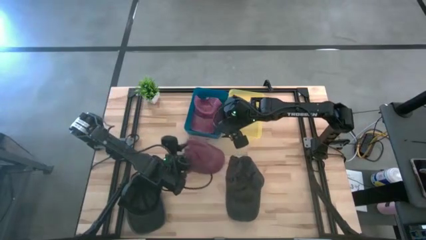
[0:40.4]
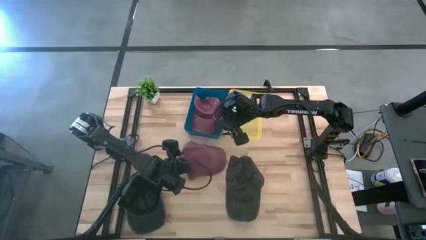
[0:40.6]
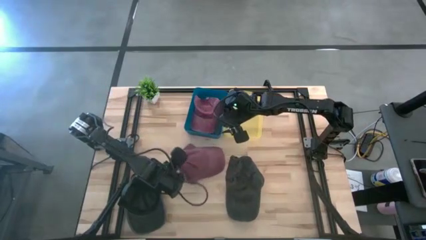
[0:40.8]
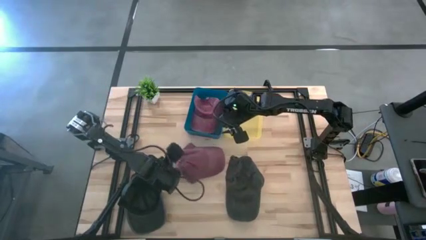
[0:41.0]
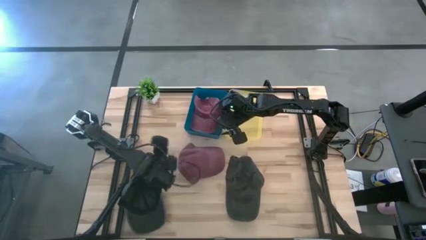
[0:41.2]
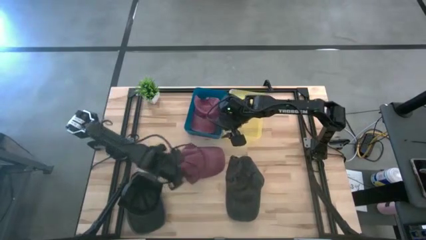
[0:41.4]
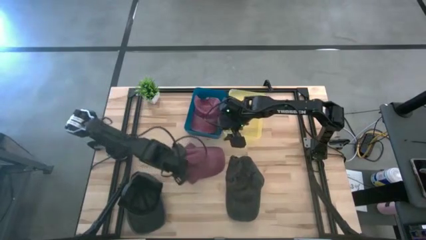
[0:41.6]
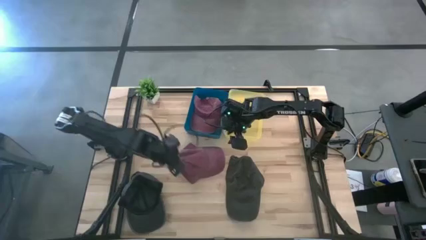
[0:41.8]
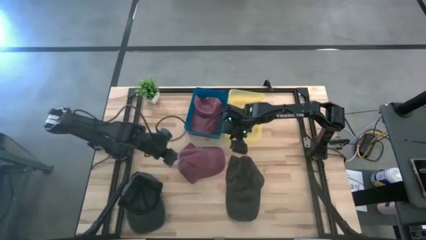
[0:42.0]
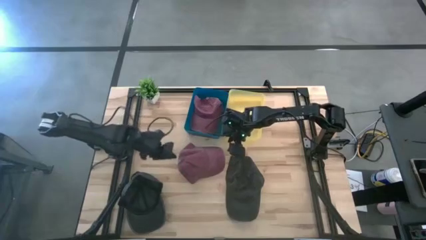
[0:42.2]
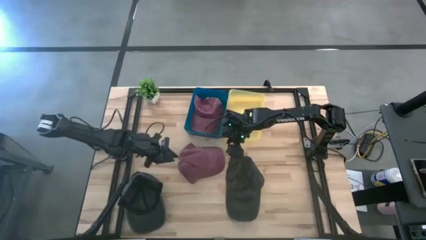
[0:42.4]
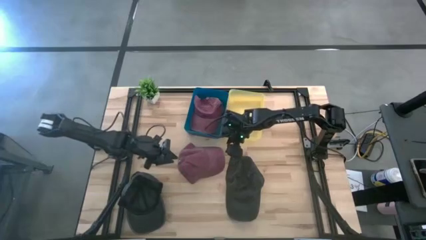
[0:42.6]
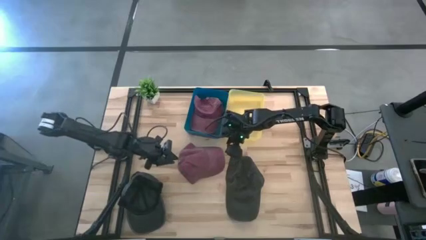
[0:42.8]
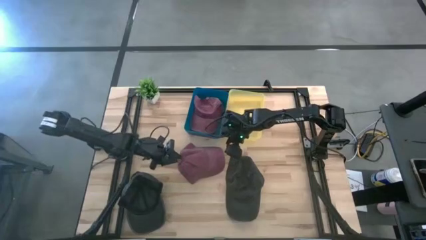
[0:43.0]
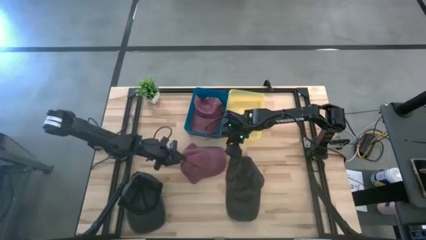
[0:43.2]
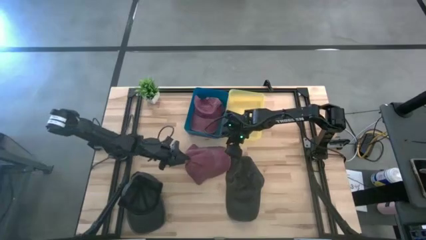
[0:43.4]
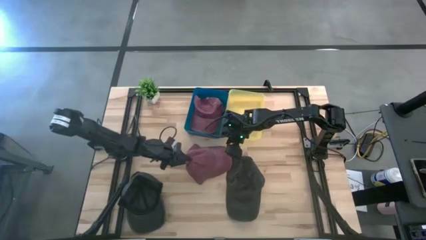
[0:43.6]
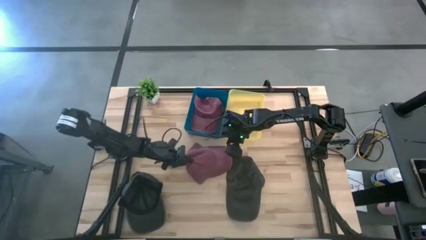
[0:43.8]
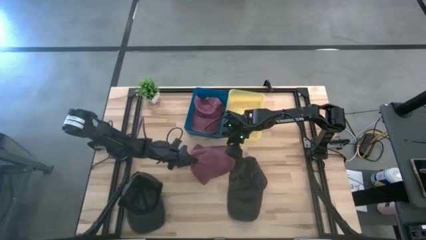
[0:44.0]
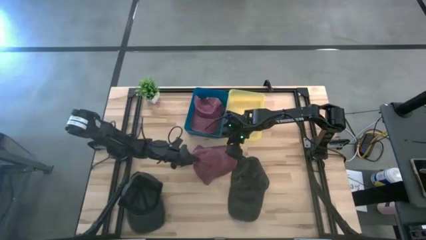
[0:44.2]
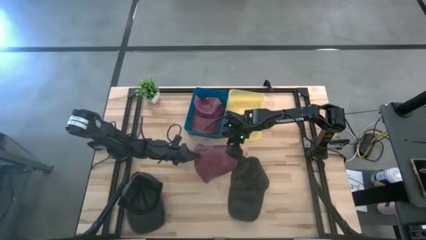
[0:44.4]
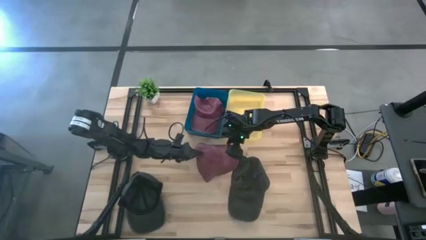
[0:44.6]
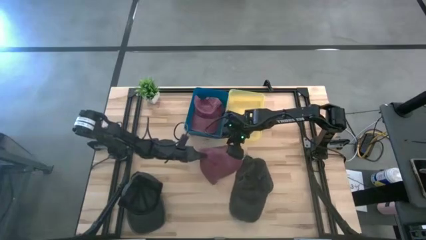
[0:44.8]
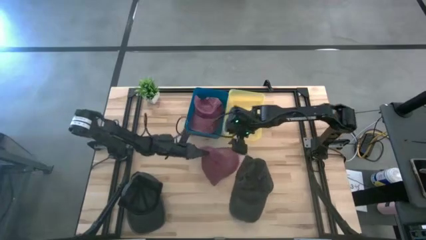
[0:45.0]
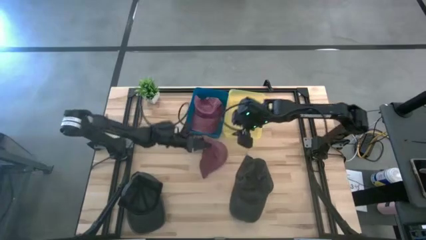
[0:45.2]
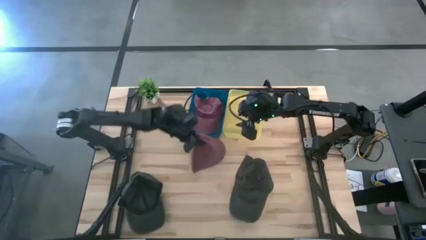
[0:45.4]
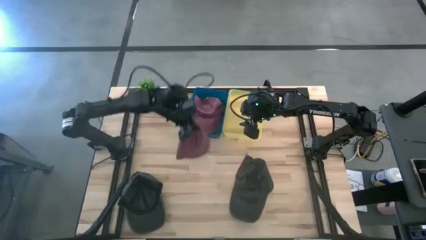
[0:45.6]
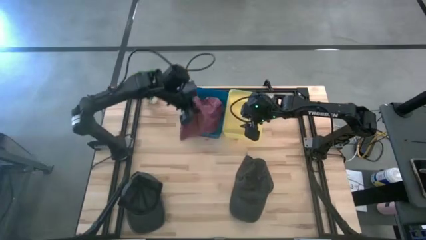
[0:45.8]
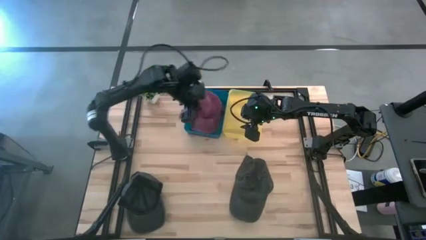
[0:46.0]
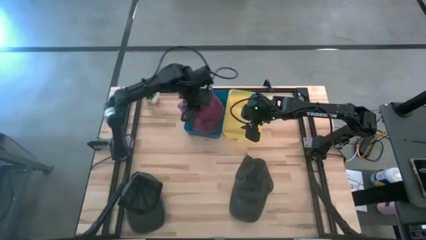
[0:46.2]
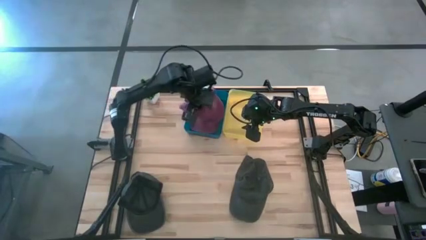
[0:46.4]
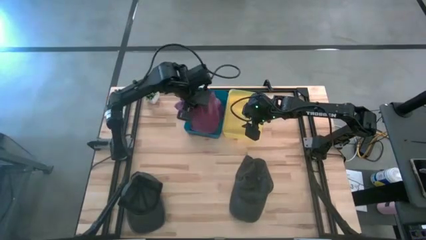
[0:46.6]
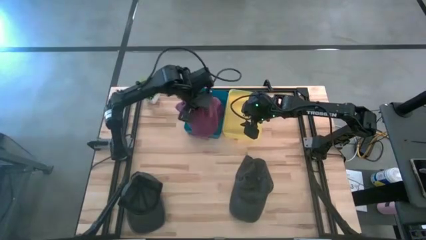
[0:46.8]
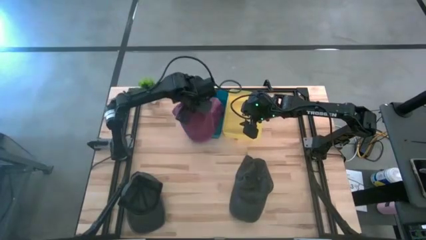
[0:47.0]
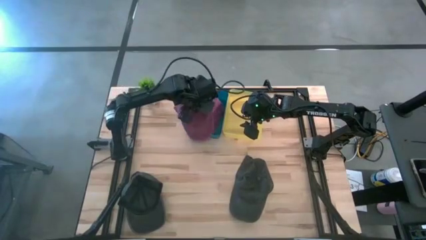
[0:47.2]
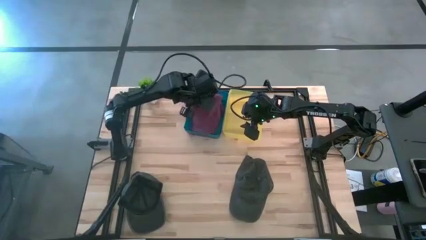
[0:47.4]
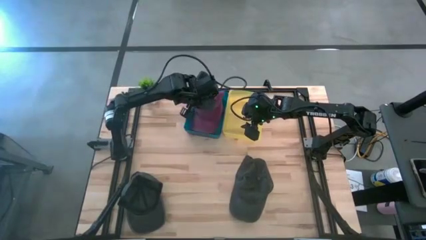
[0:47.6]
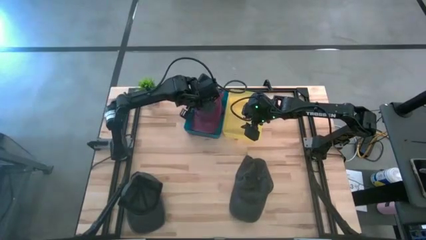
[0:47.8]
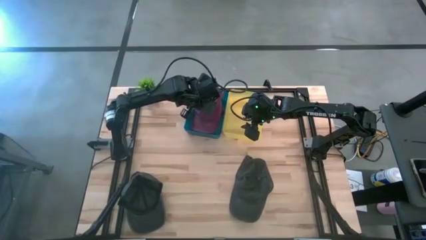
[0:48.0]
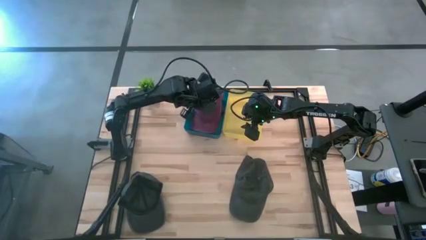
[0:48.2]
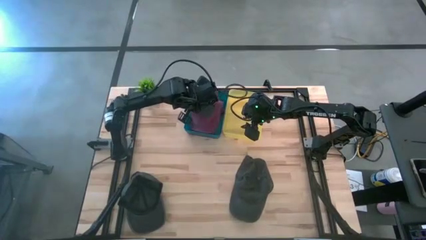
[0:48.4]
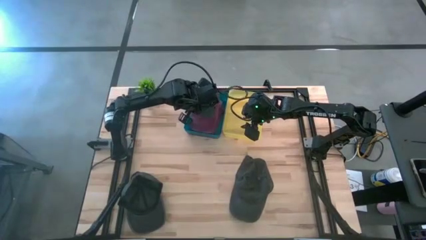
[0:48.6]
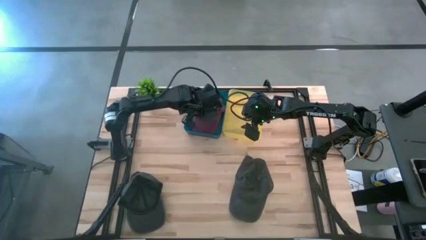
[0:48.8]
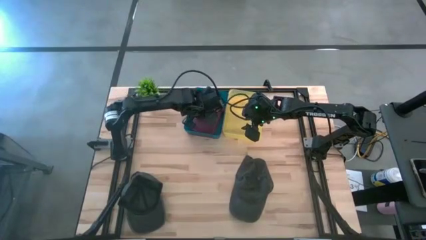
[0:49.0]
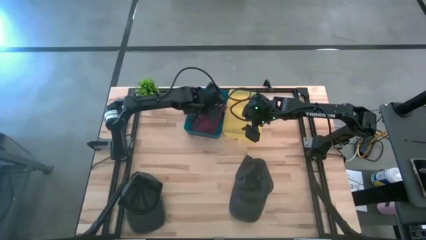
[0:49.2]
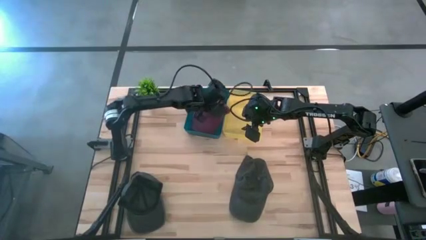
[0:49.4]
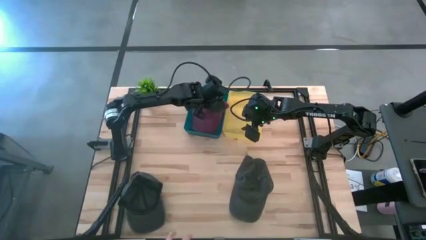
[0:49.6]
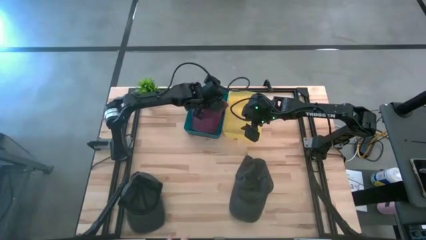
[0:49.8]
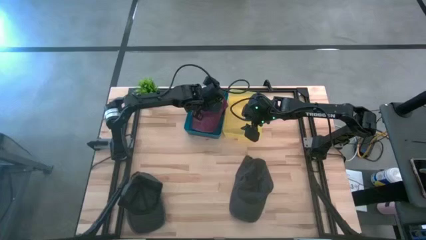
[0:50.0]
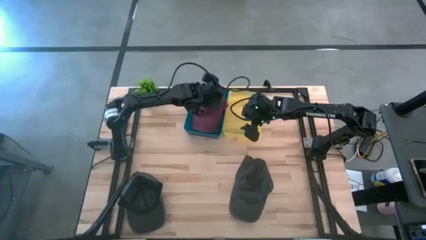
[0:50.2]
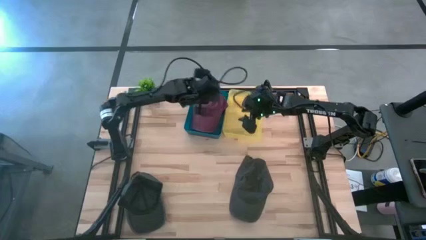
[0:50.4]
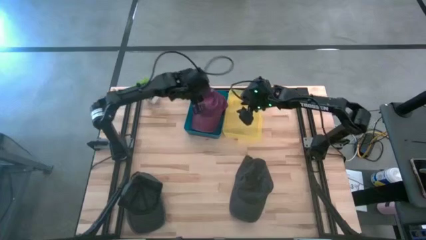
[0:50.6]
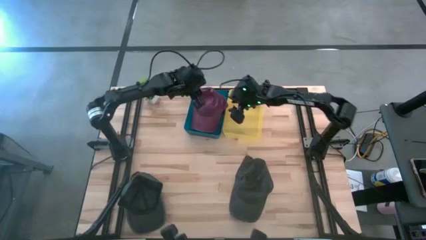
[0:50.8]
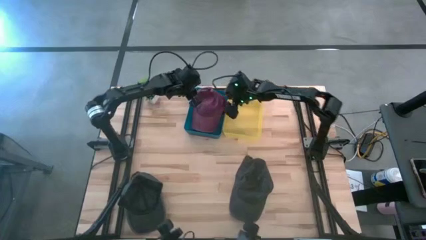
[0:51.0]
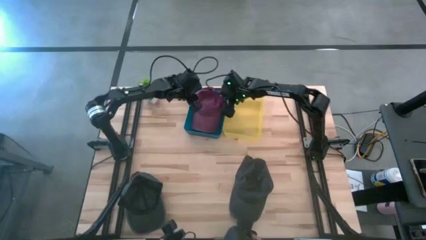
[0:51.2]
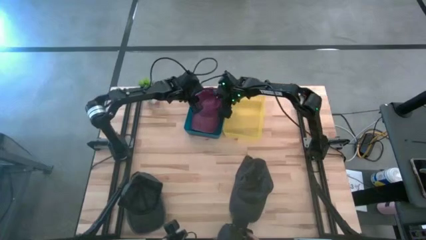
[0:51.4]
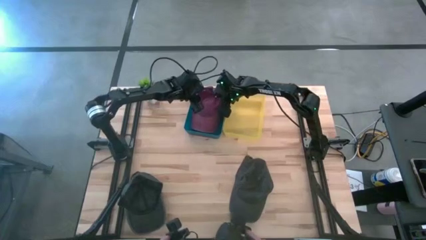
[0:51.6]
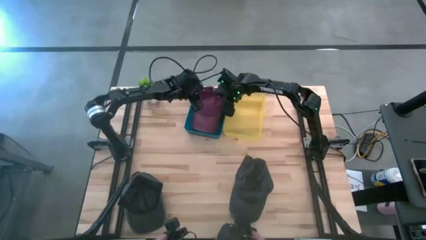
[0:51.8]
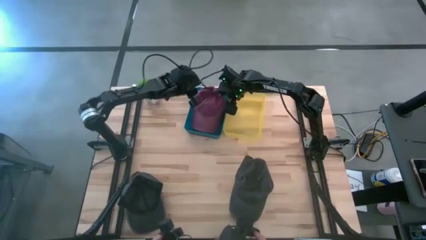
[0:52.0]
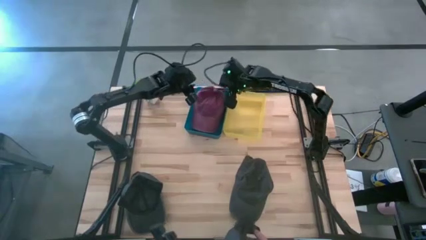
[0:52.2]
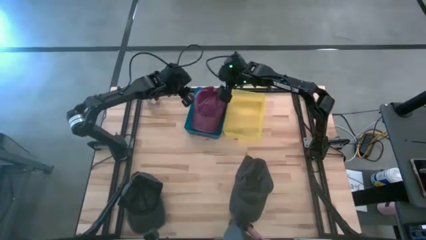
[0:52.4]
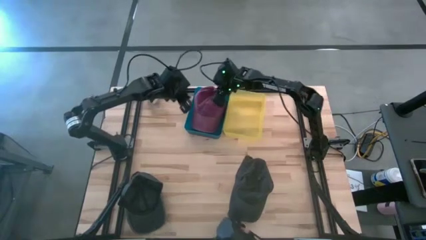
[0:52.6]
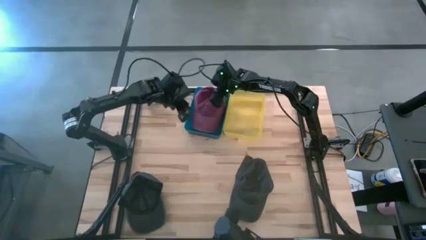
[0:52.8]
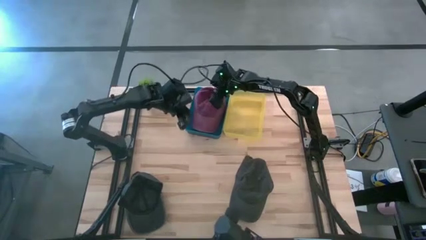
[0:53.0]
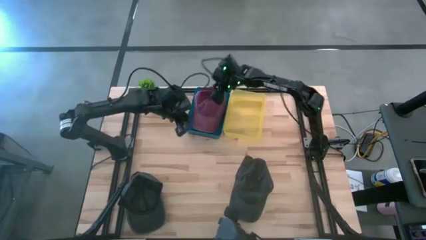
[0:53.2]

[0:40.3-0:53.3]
Task: Pick & Place hat
Put the red cap into the blue bin
